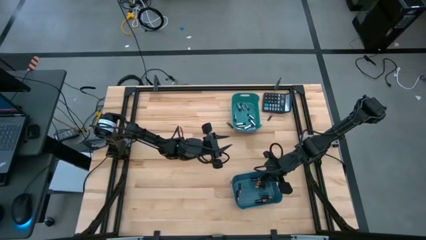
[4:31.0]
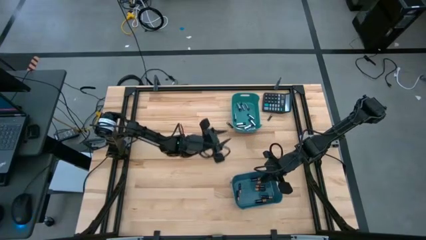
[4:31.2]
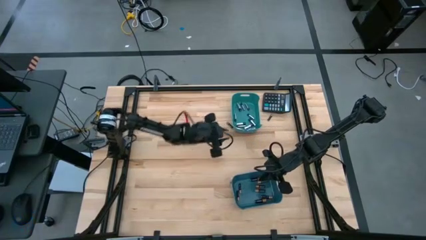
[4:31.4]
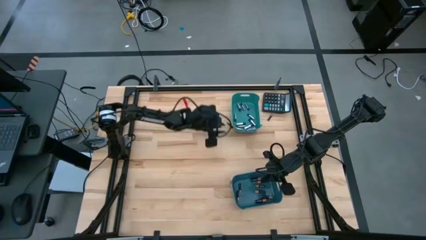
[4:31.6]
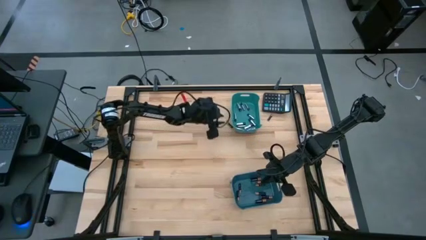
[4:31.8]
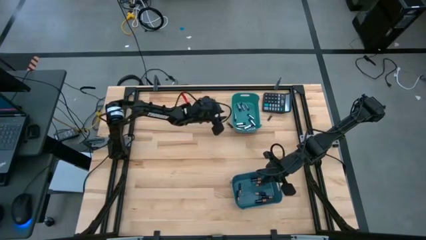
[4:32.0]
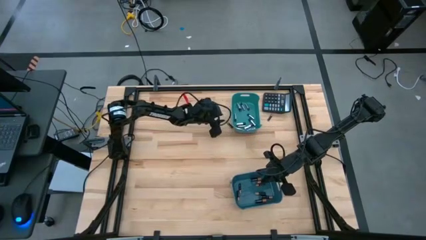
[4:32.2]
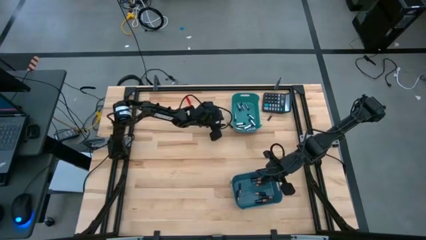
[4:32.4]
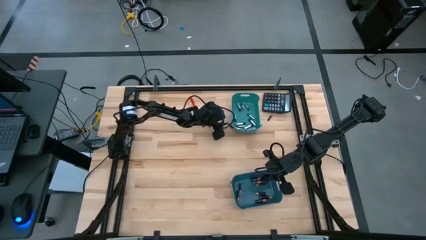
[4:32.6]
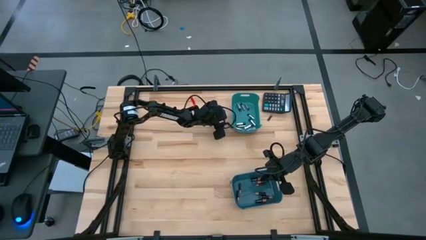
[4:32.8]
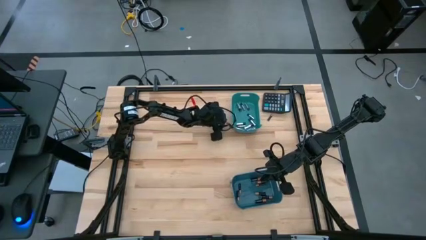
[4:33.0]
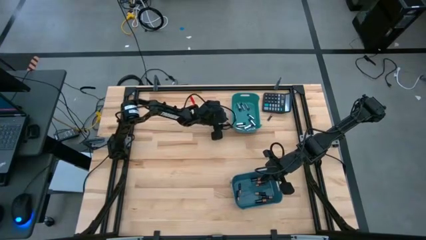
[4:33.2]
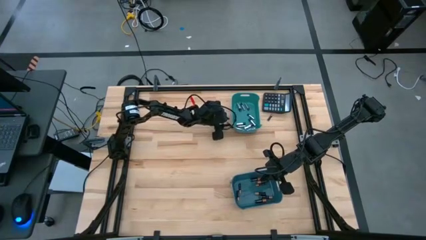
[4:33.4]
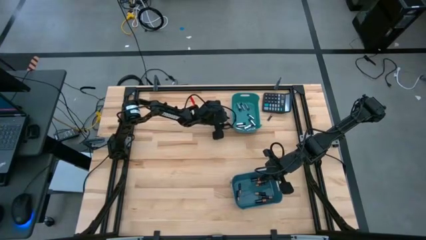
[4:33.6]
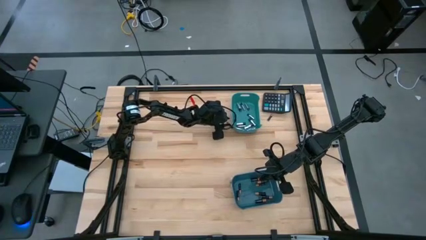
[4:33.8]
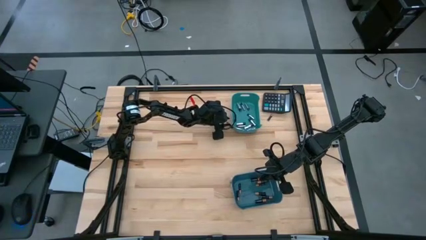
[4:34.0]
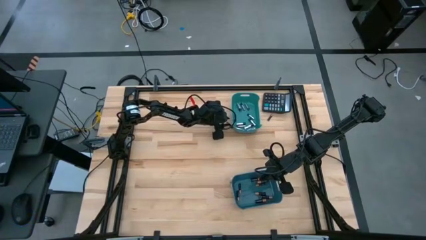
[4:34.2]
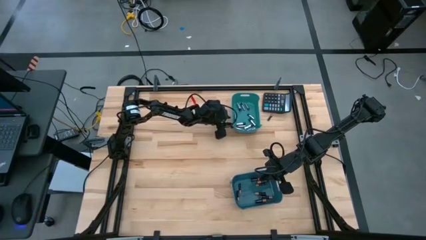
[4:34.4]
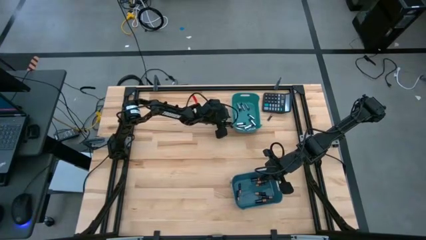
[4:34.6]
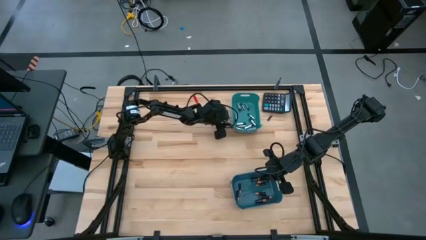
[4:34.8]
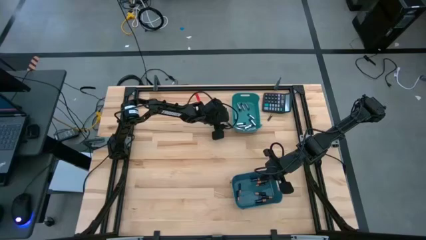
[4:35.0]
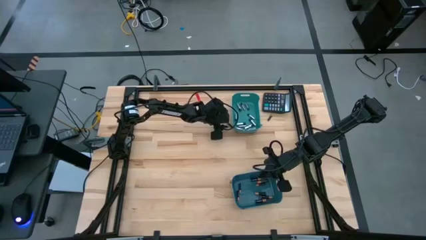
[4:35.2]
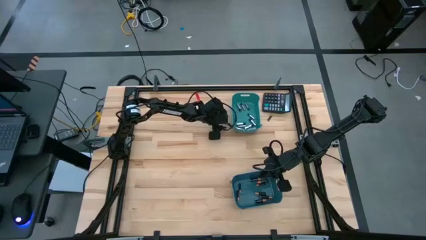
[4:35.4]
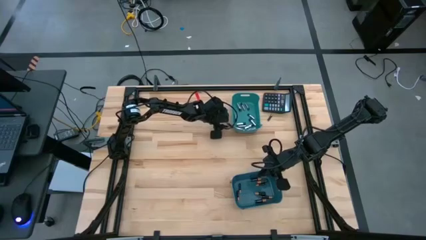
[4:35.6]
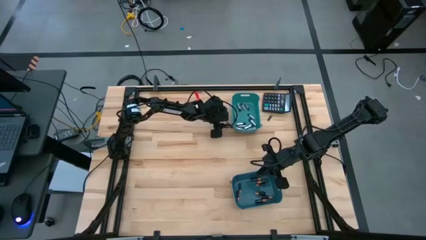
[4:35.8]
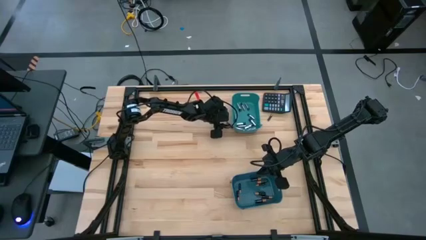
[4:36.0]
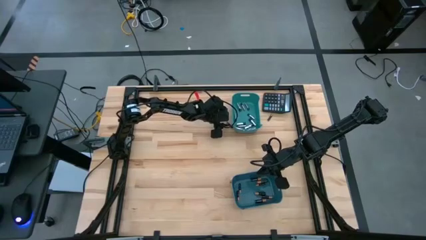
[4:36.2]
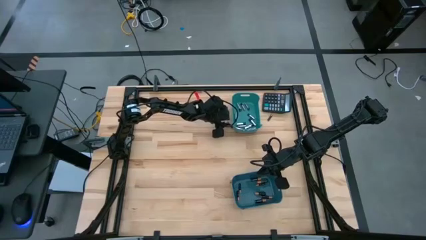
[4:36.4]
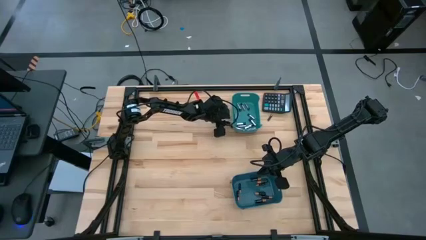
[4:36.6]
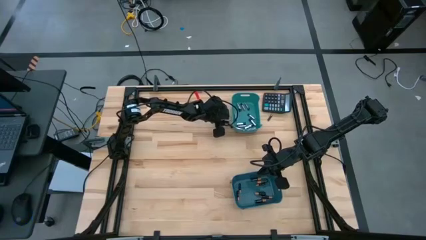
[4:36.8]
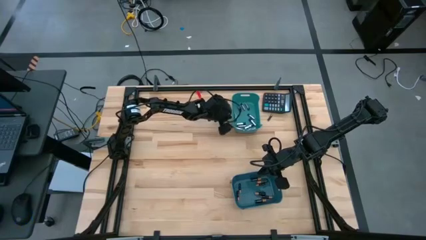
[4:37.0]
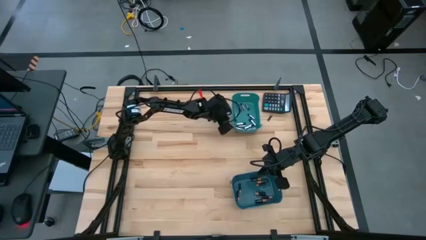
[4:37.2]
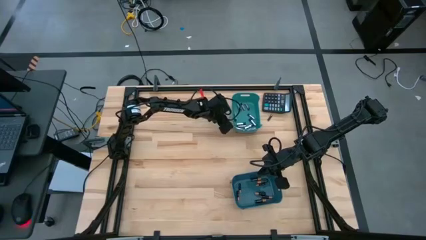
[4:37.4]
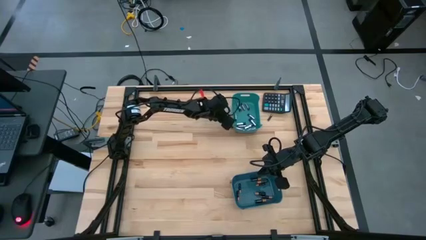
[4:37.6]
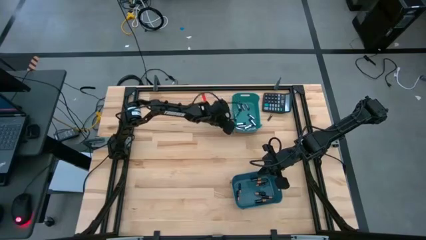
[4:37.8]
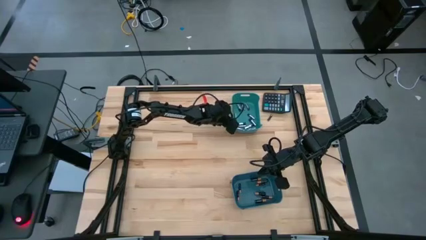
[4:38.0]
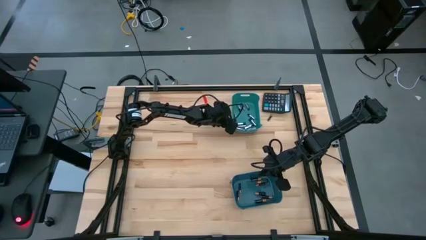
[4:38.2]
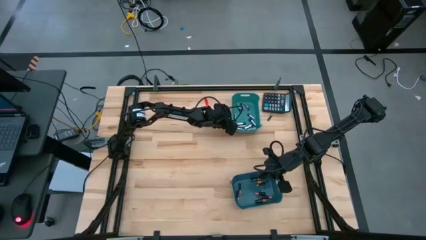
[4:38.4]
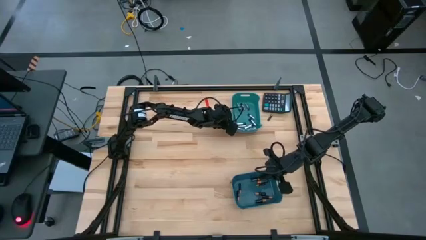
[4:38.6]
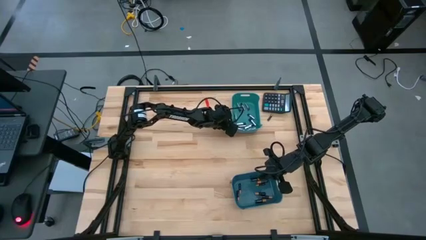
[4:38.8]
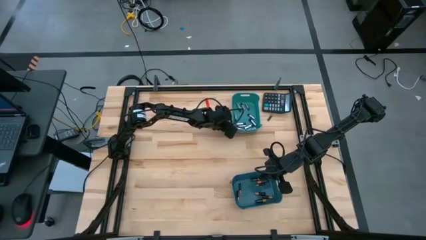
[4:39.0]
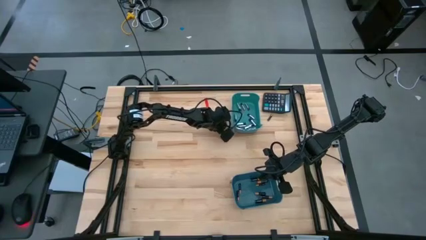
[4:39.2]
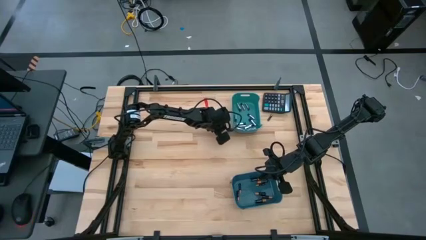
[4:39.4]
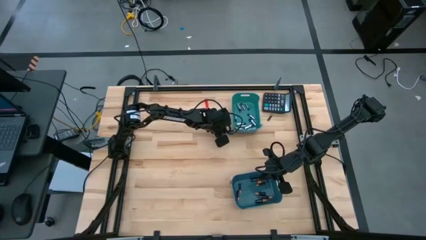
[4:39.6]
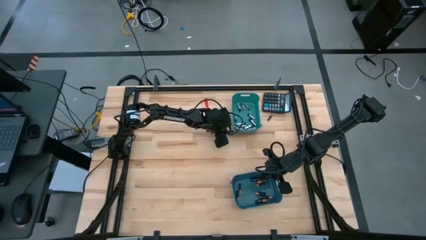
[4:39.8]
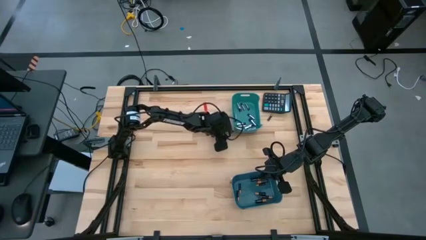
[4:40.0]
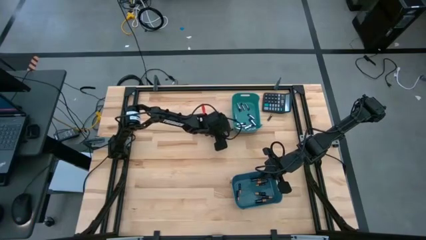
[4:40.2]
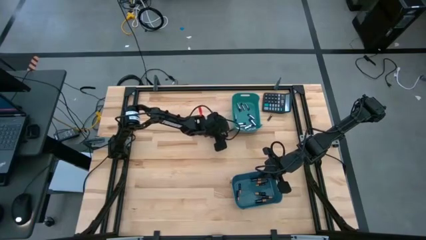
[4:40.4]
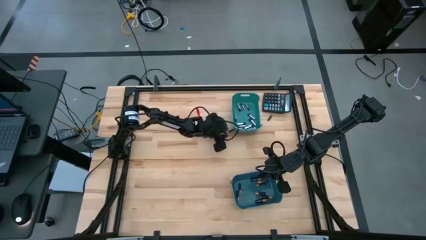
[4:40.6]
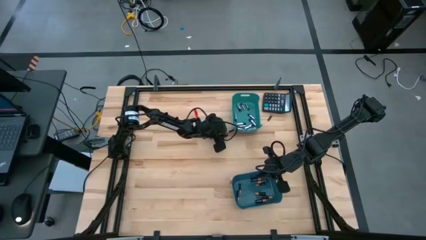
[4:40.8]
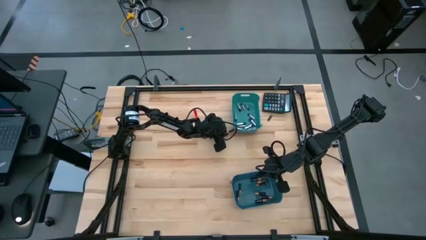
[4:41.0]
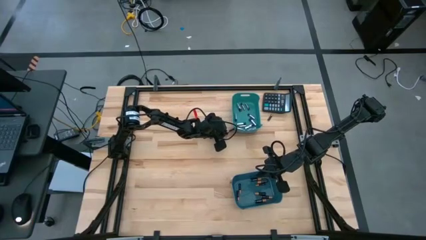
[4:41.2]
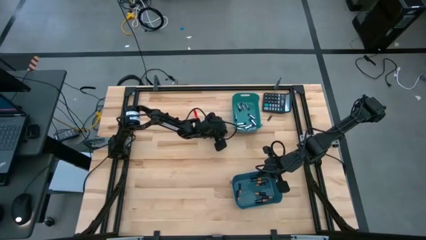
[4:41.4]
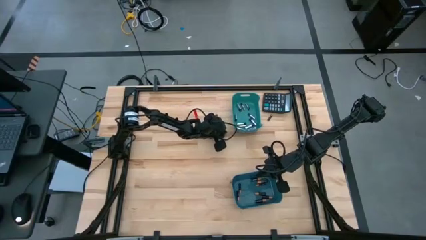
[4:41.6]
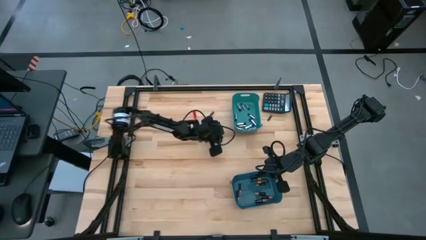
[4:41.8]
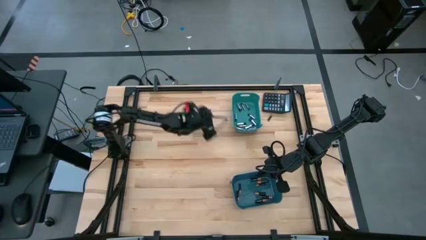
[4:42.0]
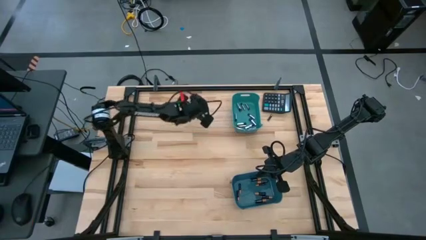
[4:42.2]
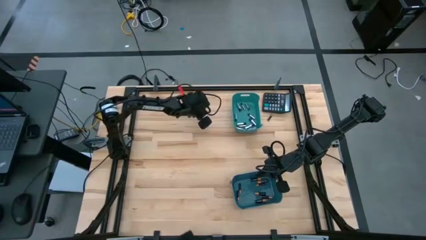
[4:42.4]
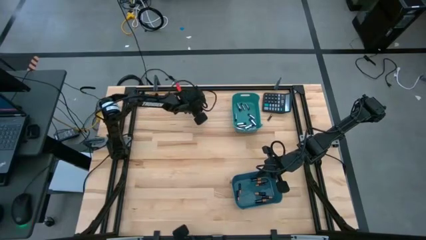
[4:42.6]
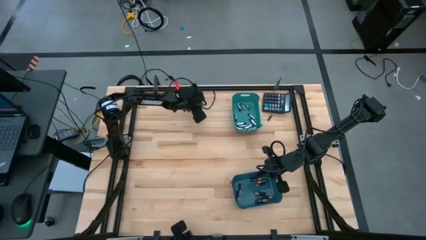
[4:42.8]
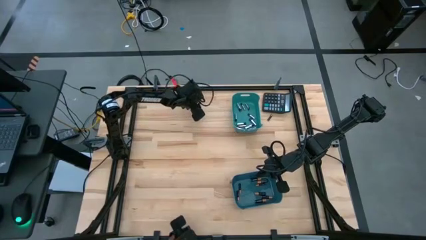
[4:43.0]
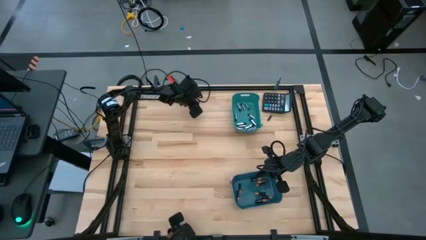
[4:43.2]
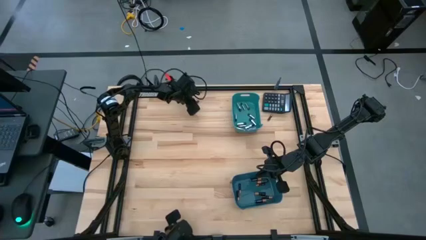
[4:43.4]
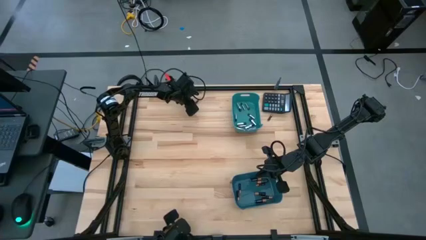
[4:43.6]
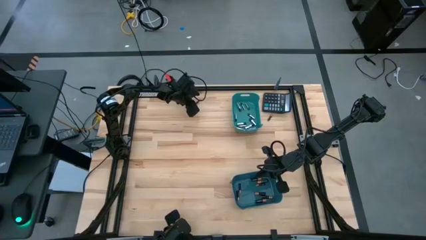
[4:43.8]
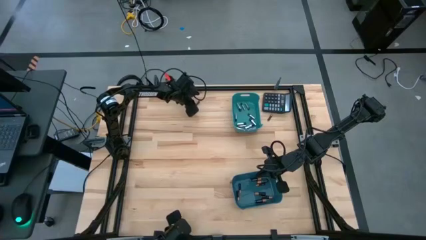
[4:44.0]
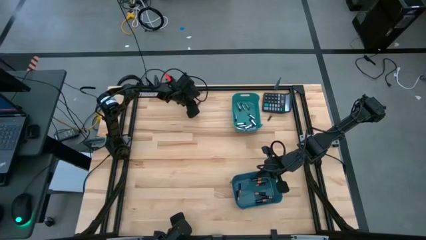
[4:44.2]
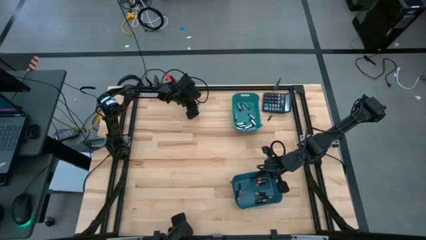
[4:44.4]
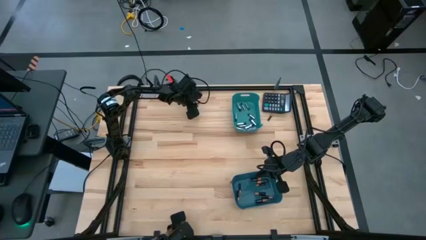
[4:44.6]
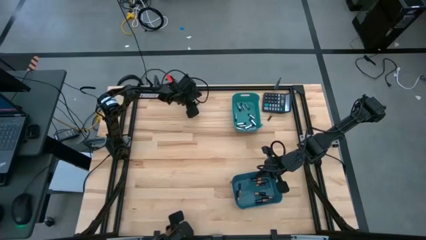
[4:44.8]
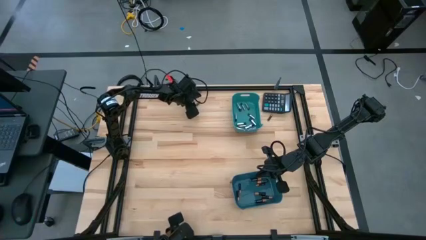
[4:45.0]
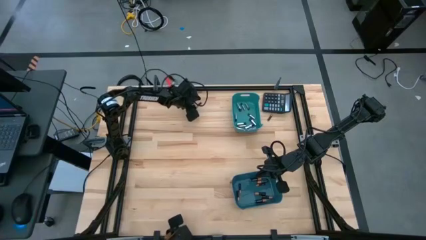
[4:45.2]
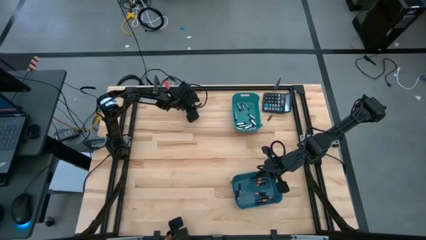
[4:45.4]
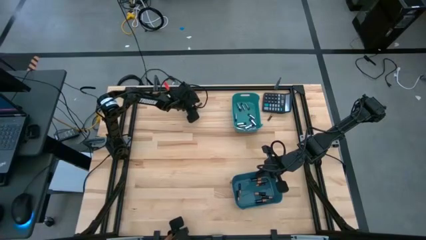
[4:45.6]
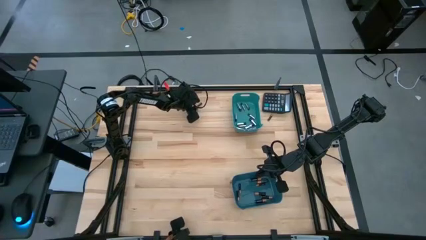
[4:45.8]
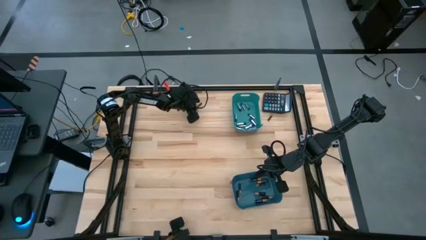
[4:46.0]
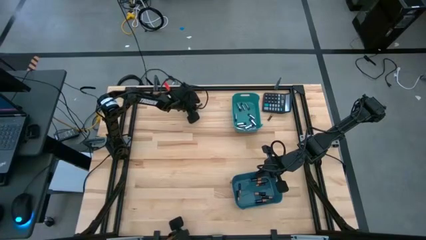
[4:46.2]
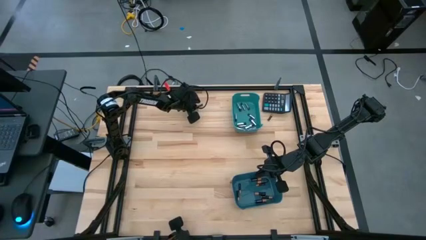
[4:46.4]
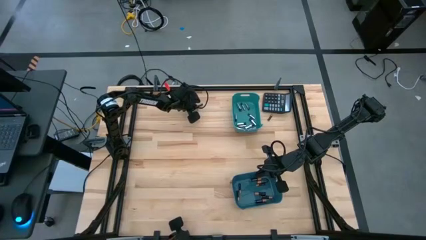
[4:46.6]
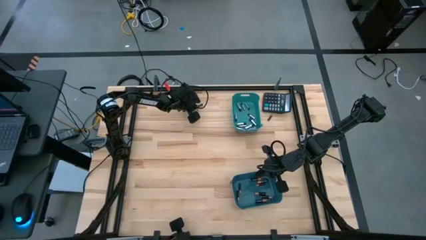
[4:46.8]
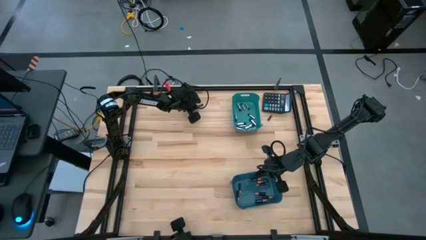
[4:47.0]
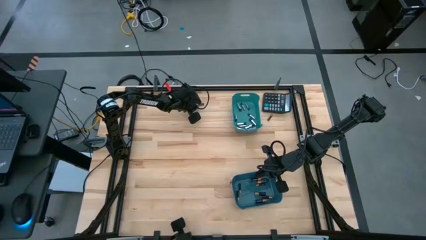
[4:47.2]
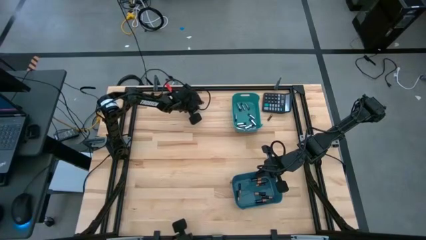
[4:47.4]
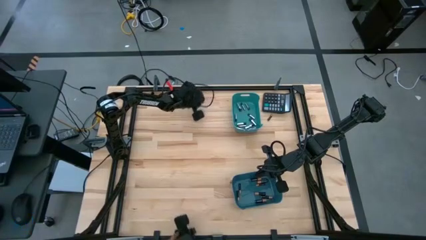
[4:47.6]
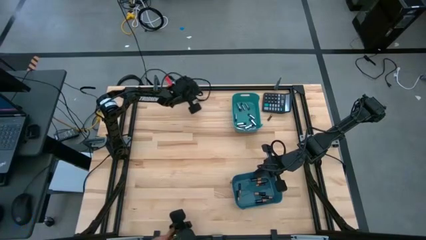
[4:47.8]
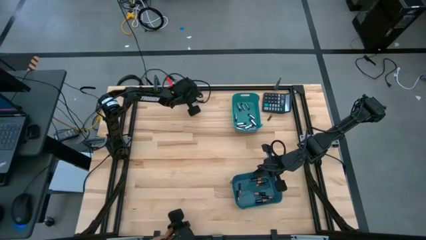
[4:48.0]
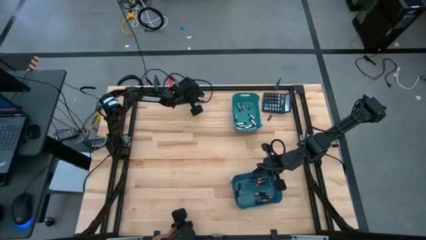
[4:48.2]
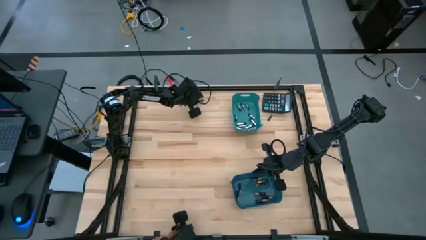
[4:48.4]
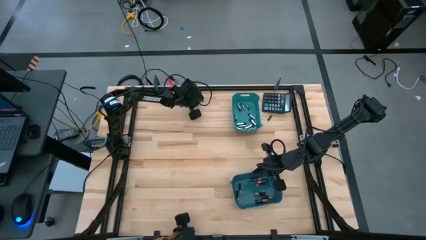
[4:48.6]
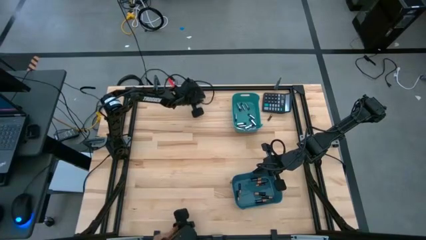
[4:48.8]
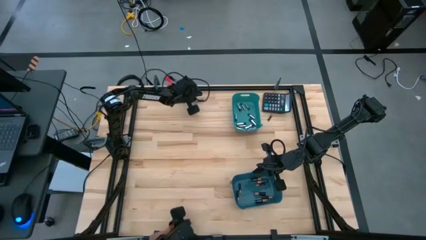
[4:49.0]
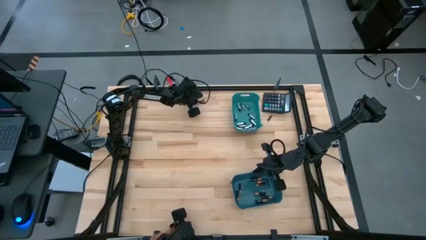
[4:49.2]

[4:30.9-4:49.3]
Task: Sort batteries
Put the black battery into the blue bin
